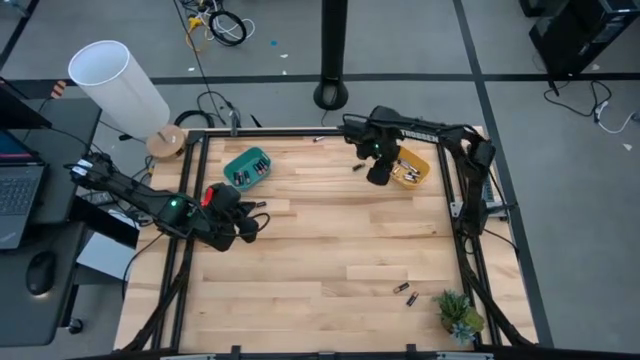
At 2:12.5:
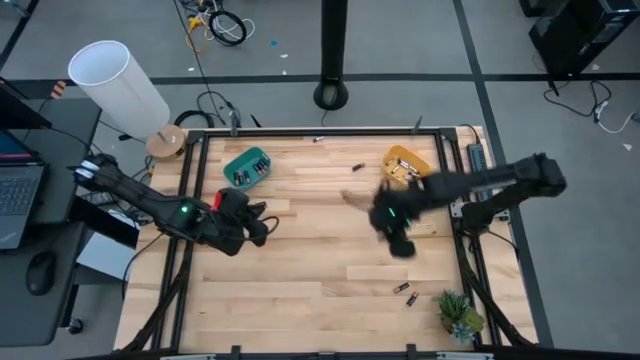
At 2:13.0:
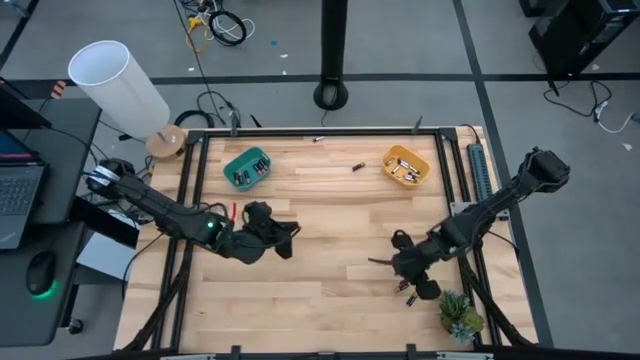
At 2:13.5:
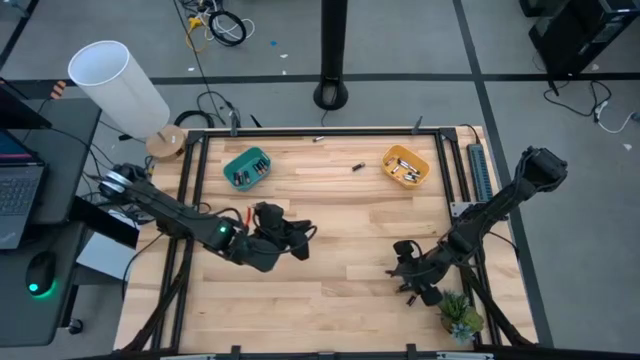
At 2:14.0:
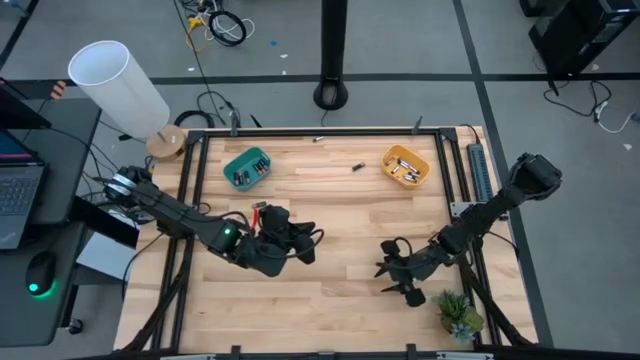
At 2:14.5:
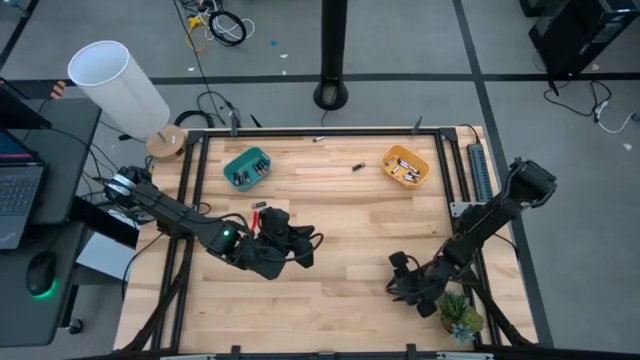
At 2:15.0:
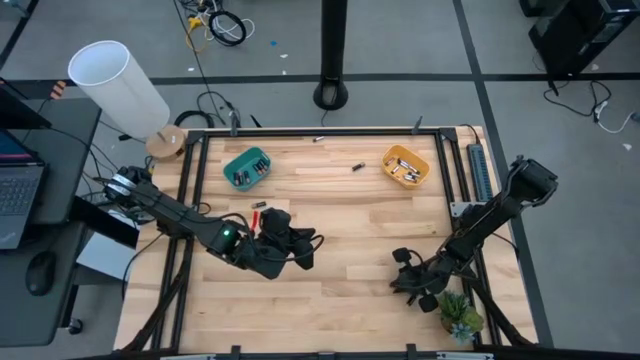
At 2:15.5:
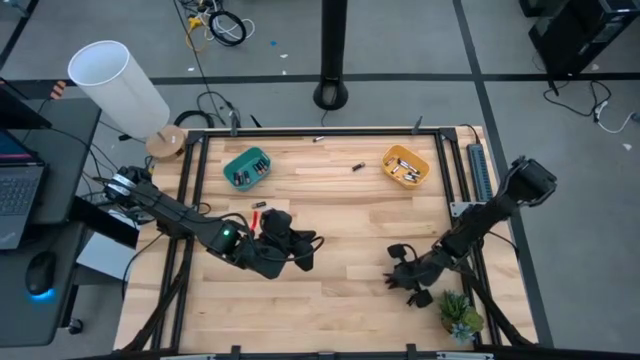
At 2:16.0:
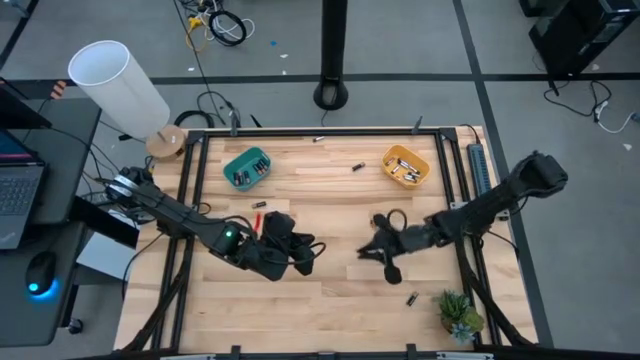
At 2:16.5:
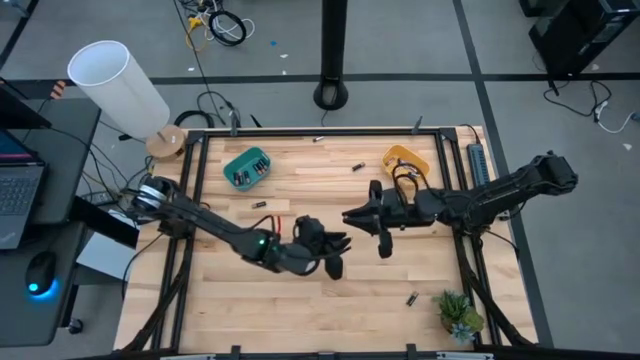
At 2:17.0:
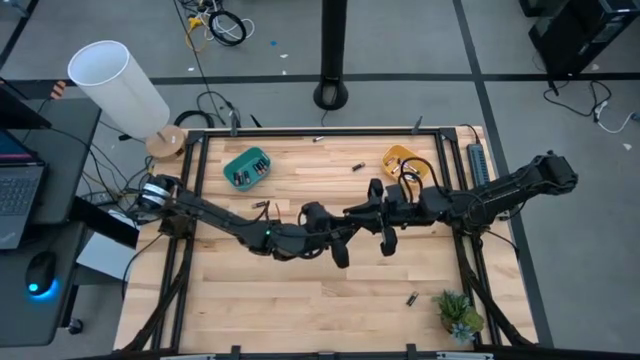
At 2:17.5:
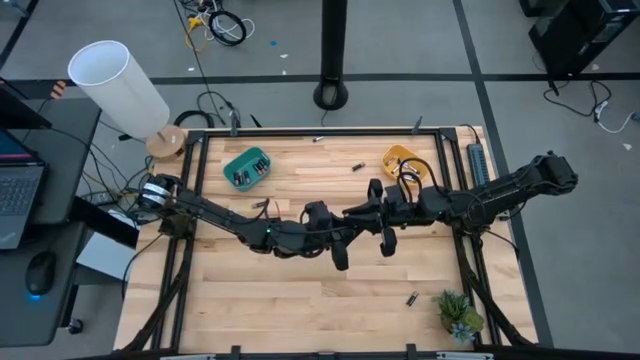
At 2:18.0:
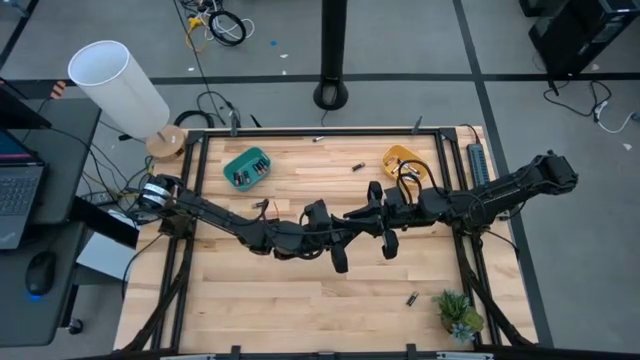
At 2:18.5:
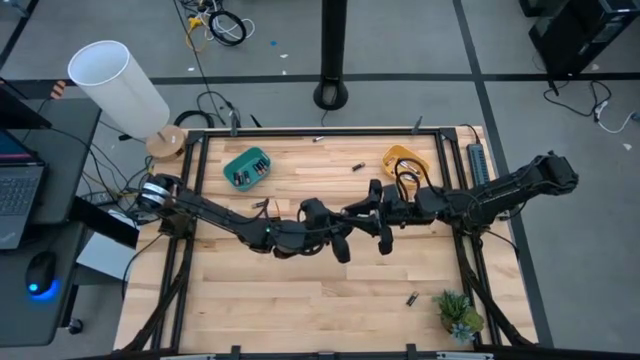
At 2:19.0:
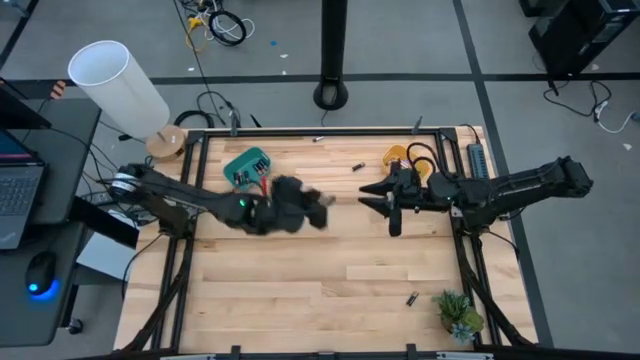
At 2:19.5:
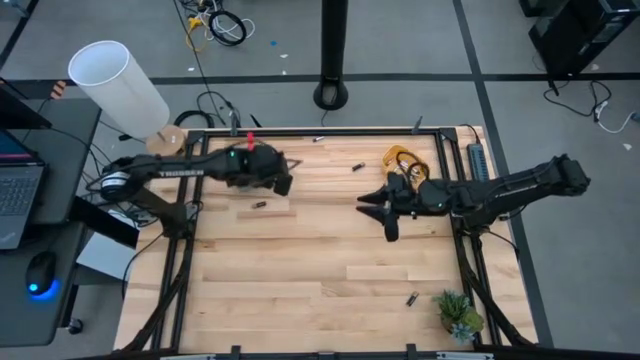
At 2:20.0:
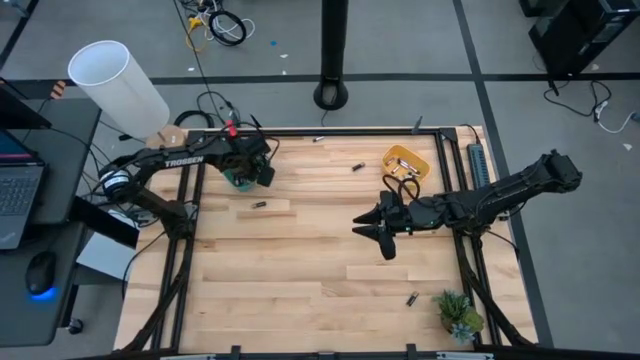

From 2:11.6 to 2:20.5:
Task: Sort batteries
Put the black battery into the blue bin

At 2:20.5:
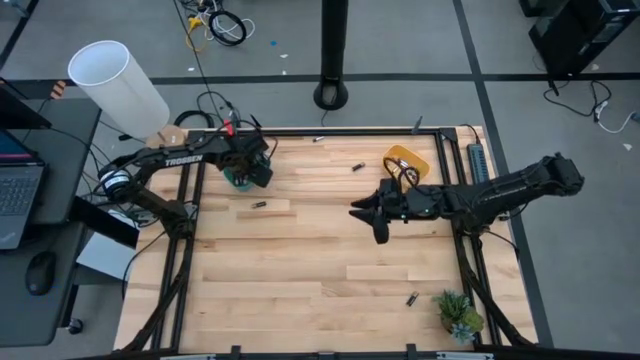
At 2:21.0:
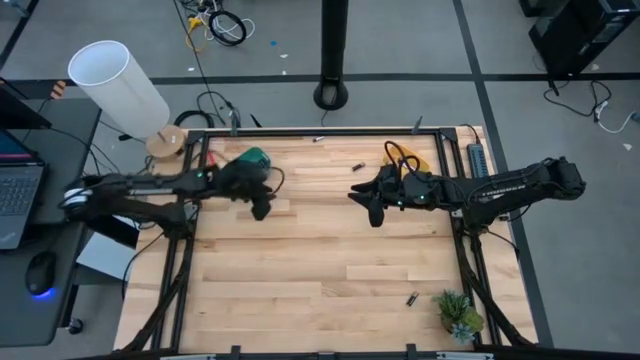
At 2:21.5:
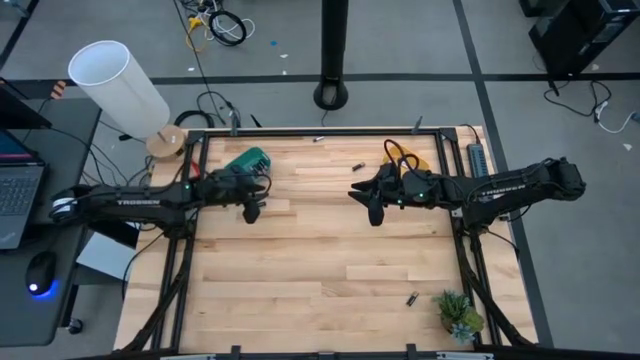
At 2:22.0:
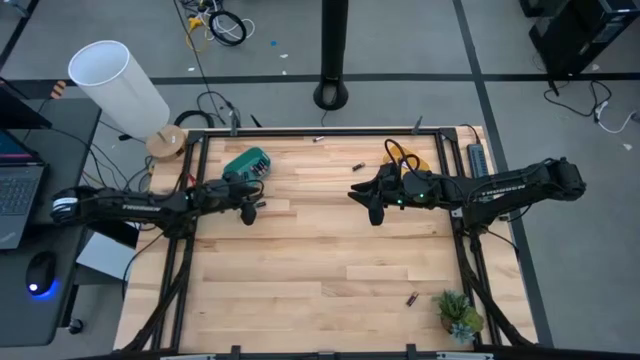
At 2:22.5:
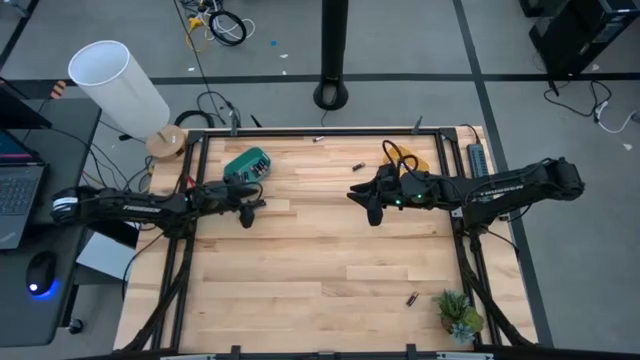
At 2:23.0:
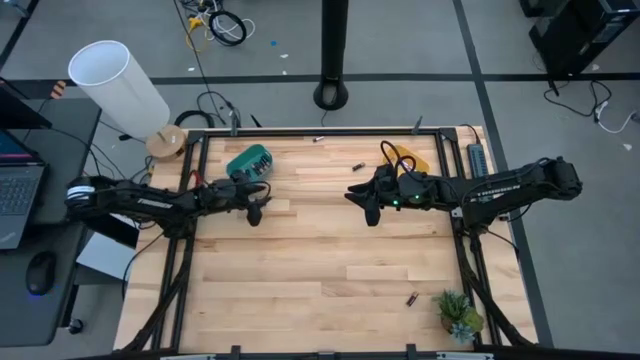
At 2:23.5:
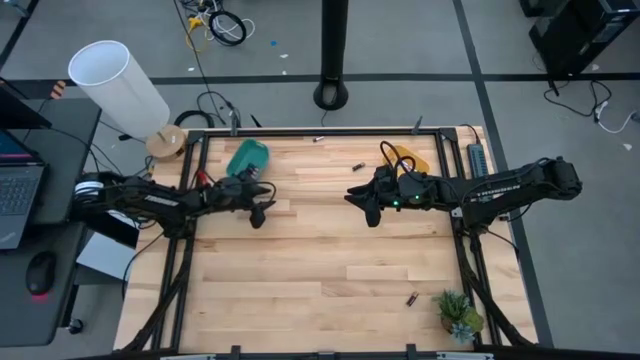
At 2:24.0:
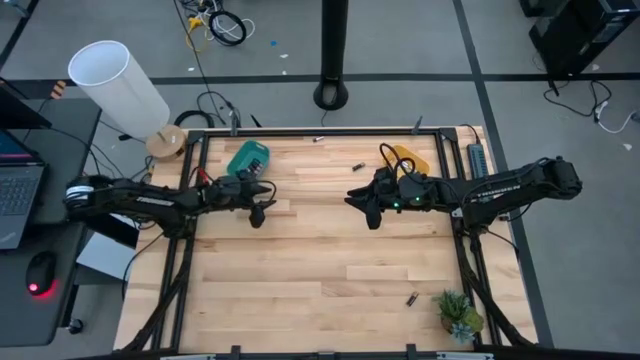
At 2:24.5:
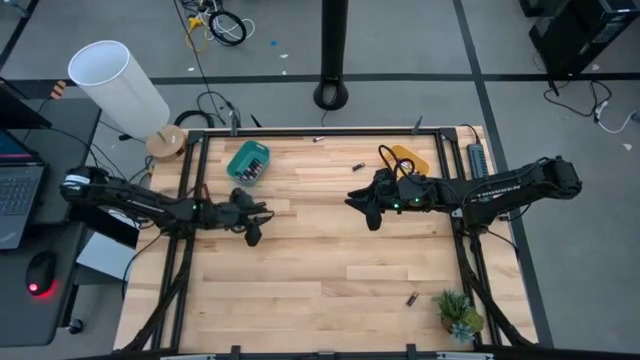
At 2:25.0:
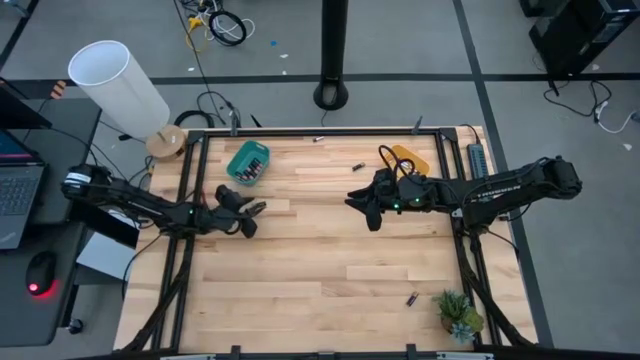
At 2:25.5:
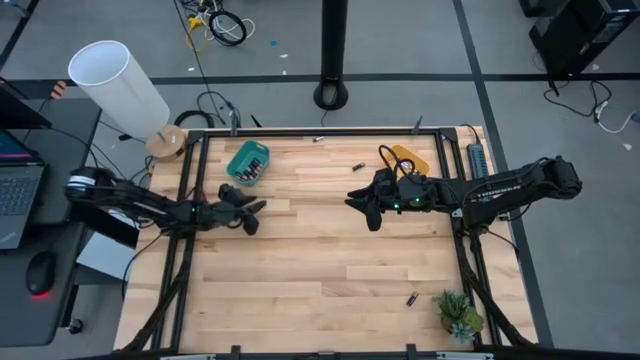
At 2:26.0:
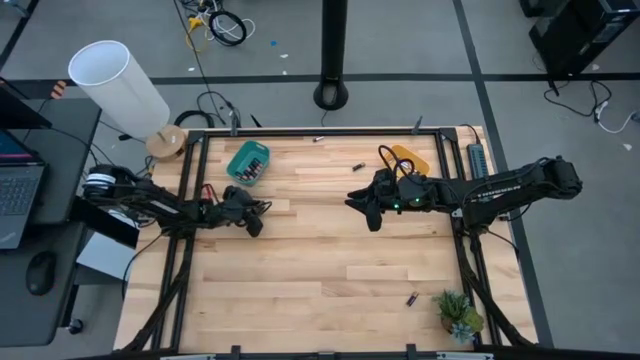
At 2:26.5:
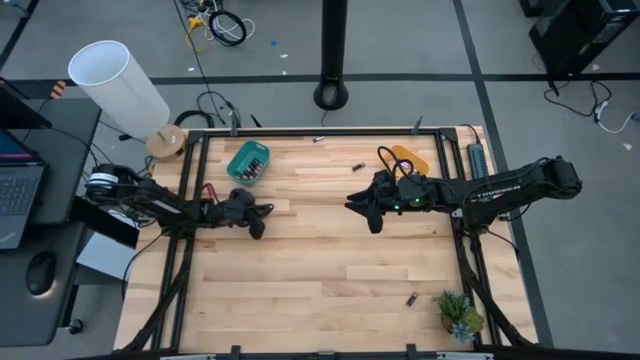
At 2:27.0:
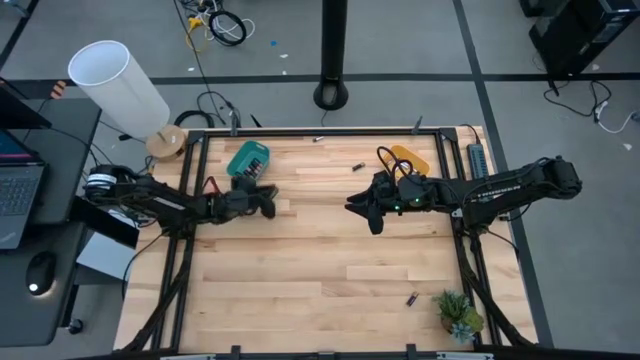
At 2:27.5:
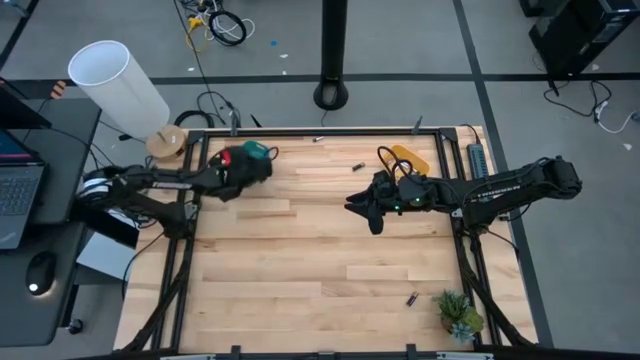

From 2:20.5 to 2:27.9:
Put the black battery into the blue bin
